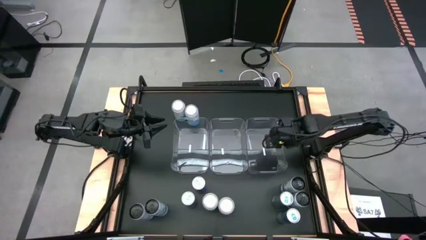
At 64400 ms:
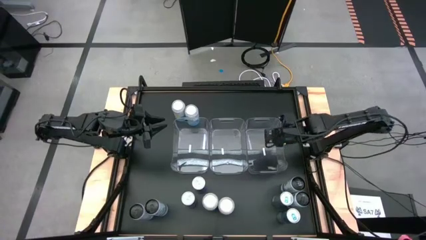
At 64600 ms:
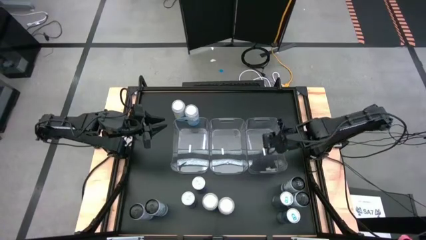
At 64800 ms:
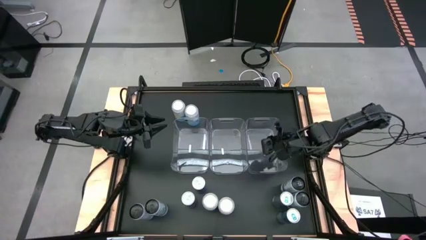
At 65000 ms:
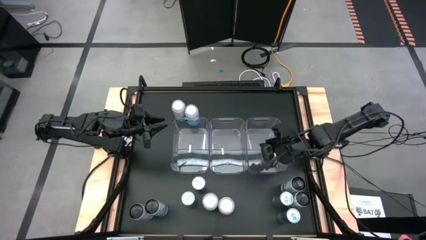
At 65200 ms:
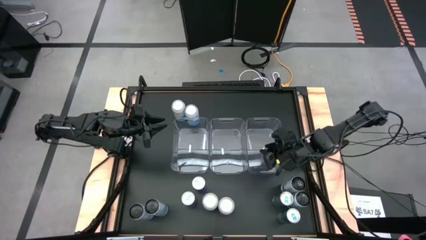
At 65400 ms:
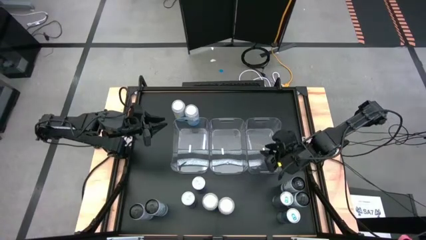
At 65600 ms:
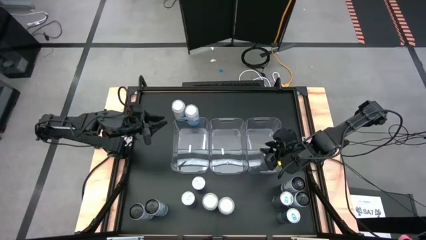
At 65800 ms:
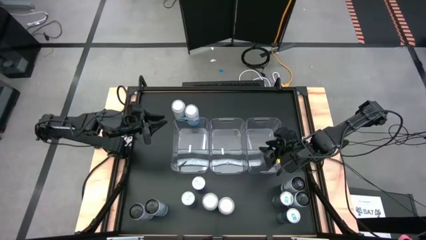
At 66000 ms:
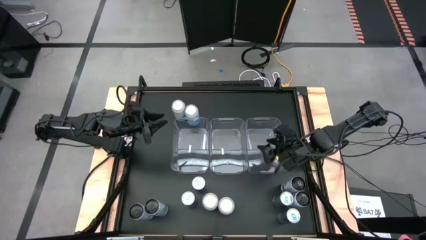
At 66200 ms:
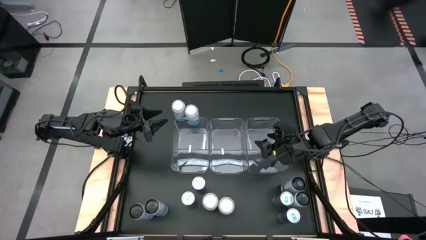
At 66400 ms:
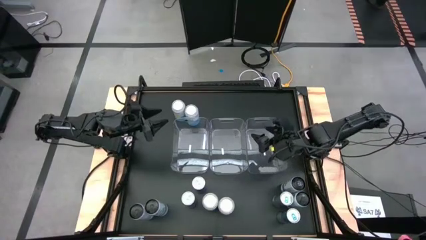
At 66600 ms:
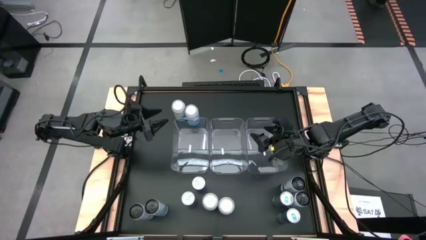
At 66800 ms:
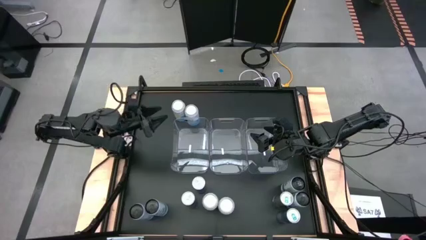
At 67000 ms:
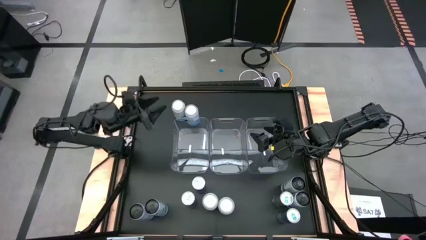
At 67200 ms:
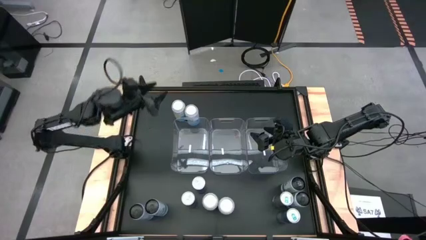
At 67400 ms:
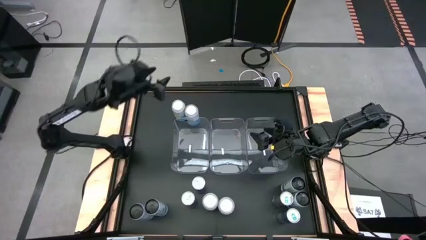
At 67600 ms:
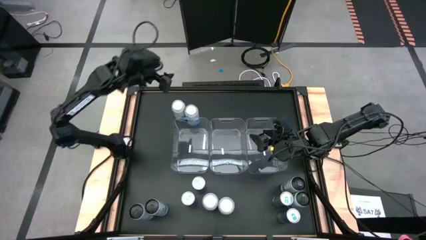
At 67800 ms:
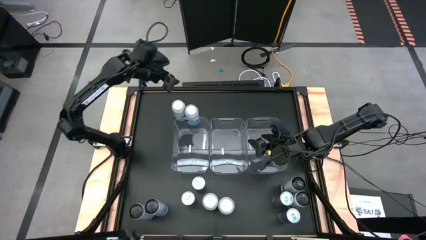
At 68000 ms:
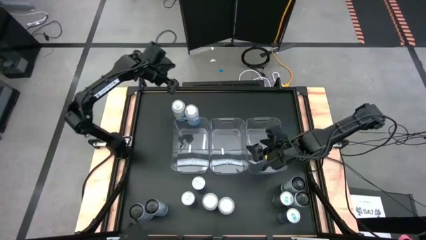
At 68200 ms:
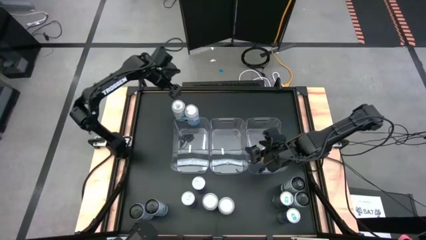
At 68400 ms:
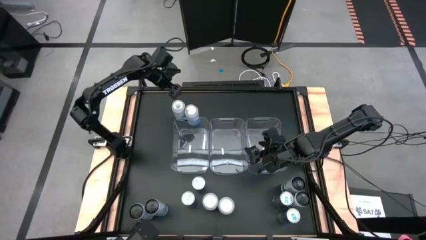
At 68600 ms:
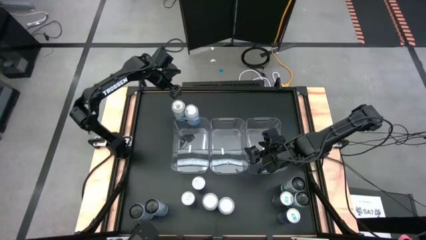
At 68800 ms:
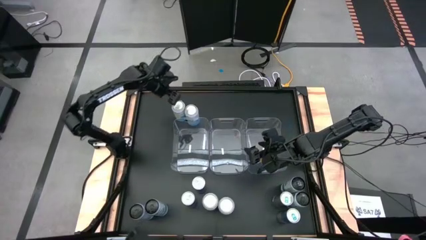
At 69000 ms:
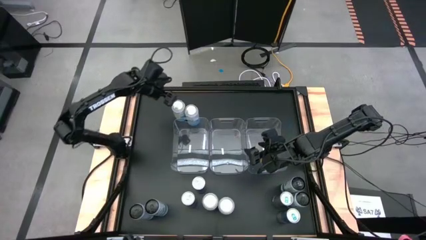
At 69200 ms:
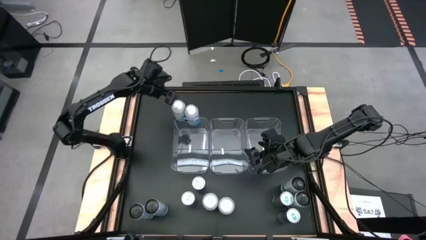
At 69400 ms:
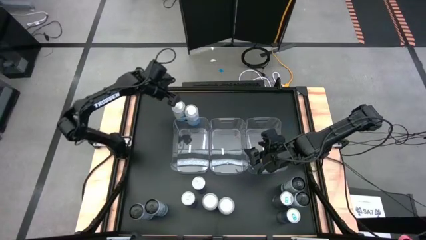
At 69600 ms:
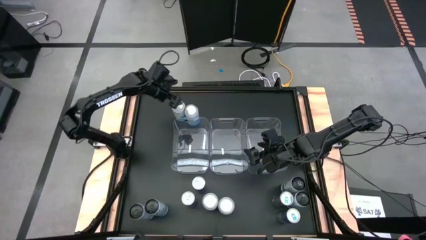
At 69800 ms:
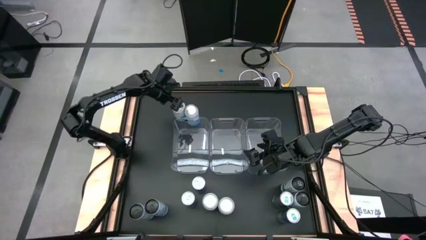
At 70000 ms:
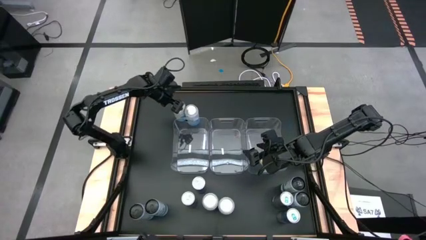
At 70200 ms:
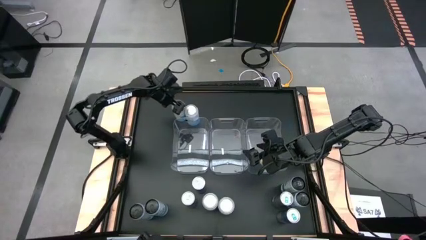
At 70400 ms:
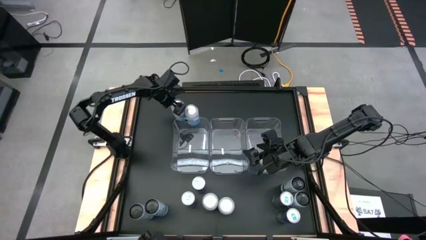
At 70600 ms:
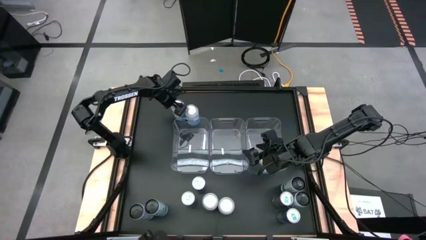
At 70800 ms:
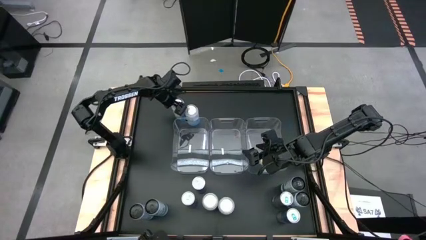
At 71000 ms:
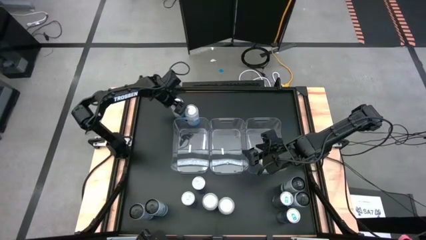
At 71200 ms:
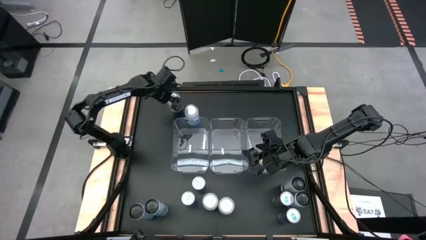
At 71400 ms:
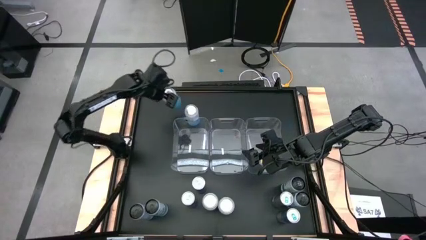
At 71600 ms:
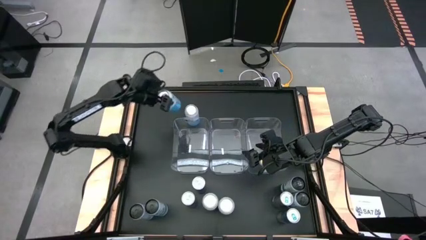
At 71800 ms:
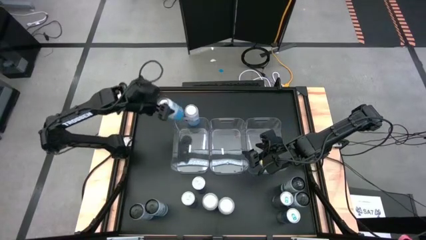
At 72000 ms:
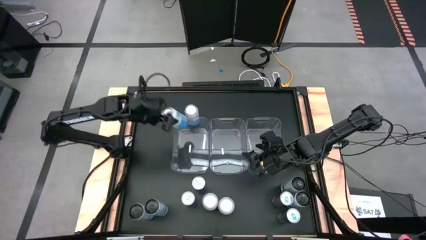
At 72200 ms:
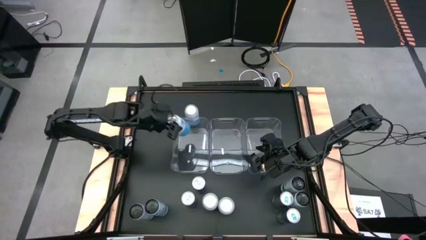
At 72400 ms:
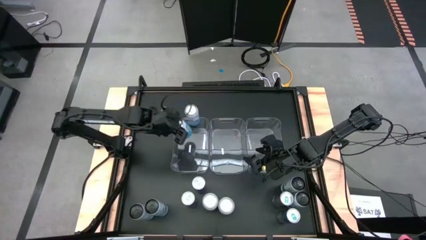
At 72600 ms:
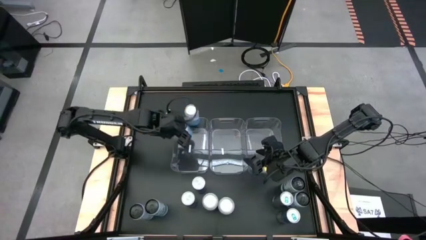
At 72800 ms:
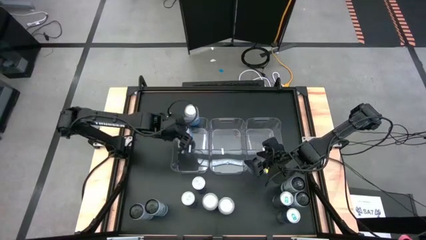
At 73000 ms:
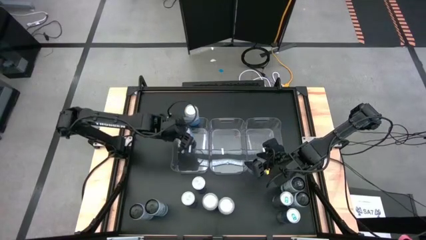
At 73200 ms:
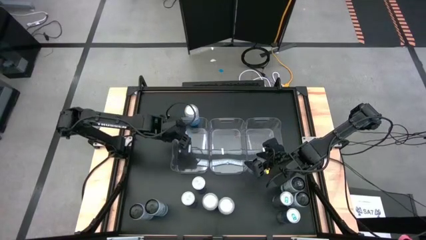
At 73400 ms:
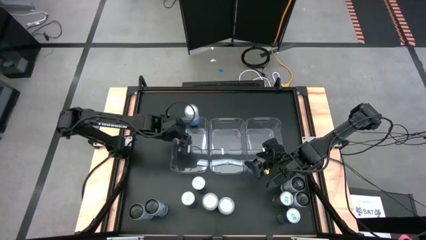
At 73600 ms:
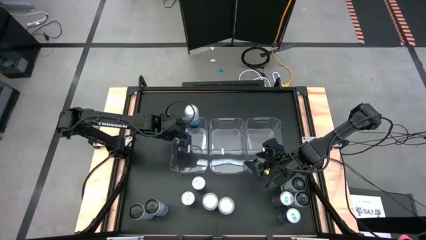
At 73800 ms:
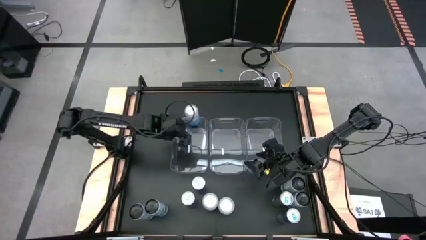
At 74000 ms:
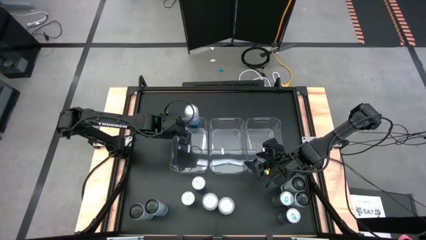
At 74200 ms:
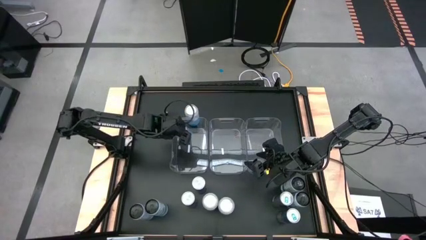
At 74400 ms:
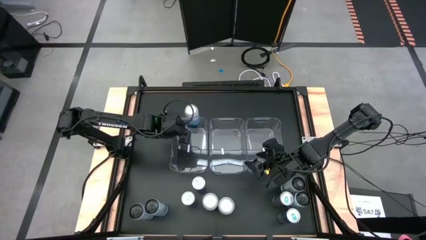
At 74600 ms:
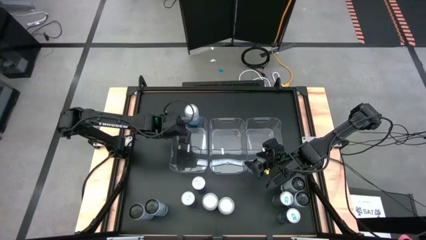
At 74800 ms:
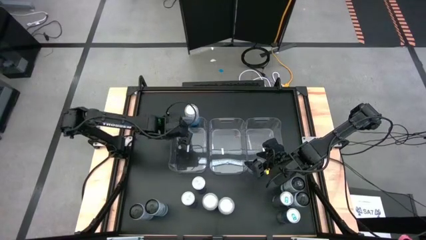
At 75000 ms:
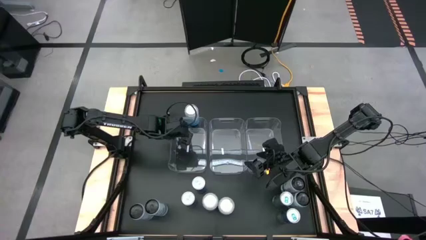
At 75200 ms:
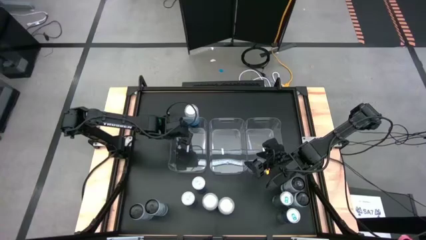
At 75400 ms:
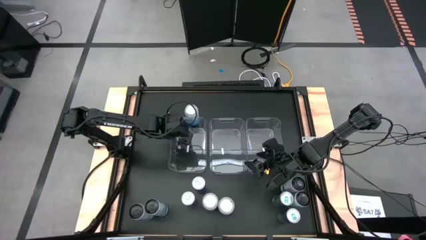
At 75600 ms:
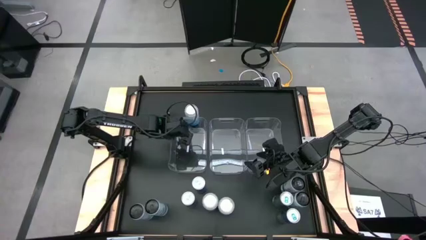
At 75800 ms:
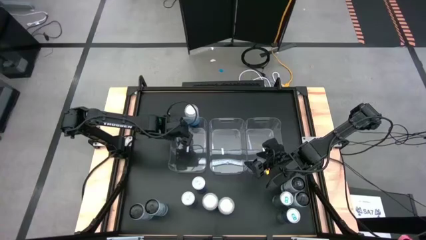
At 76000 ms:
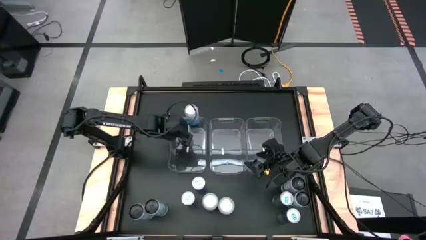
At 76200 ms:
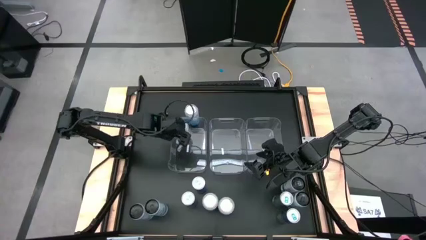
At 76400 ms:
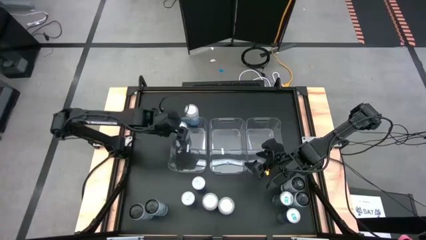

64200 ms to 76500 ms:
Task: Sort soda cans
Put the top left blue-white soda can into the left transparent bin

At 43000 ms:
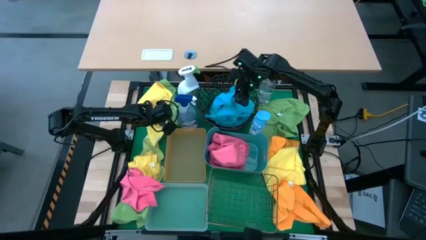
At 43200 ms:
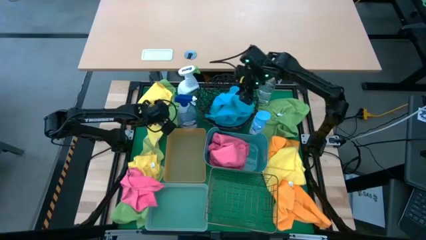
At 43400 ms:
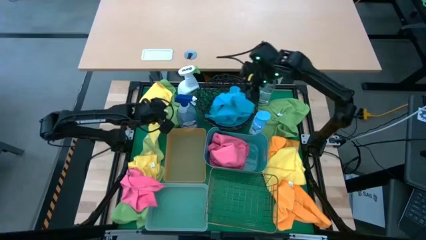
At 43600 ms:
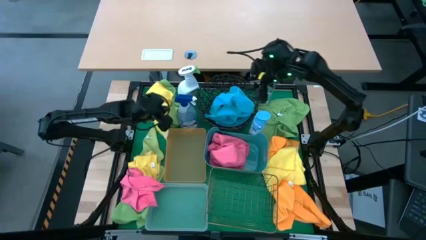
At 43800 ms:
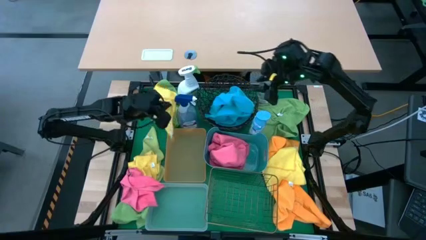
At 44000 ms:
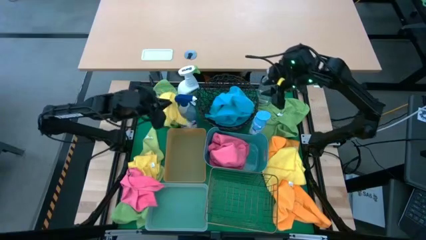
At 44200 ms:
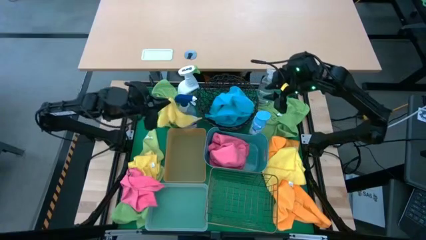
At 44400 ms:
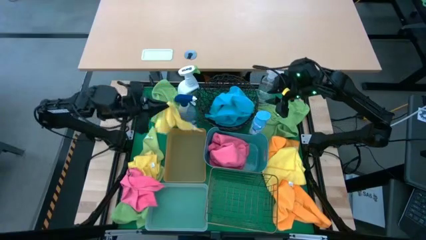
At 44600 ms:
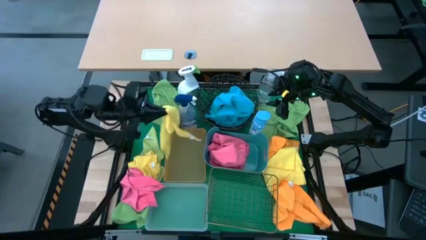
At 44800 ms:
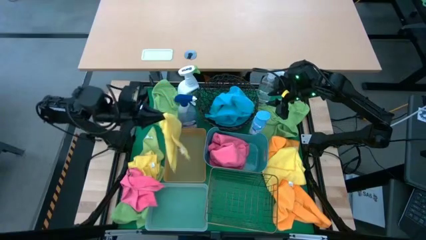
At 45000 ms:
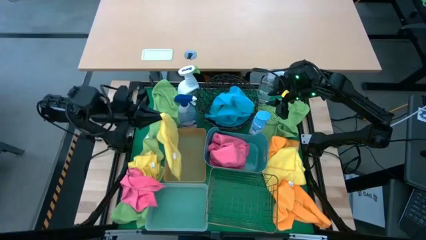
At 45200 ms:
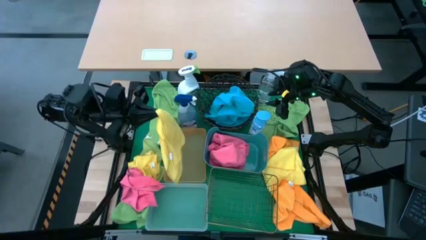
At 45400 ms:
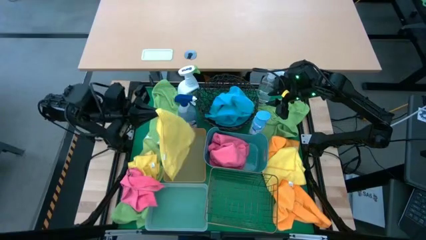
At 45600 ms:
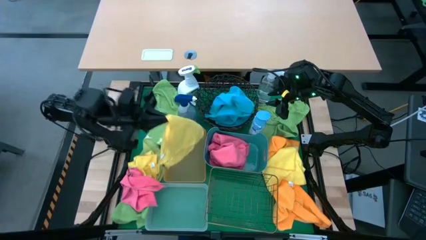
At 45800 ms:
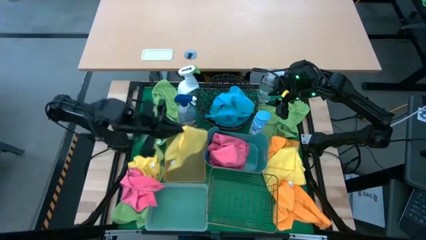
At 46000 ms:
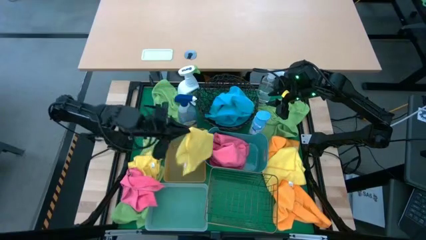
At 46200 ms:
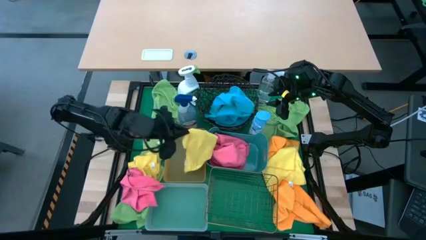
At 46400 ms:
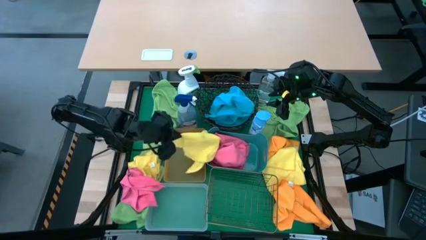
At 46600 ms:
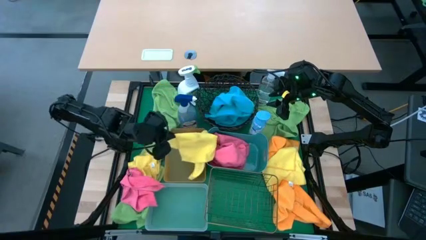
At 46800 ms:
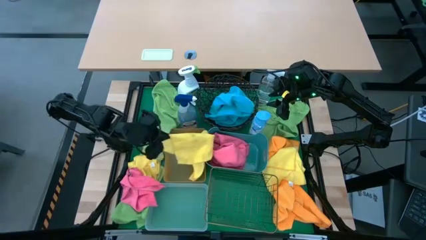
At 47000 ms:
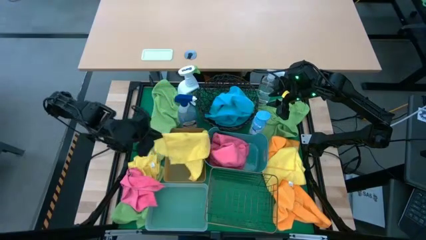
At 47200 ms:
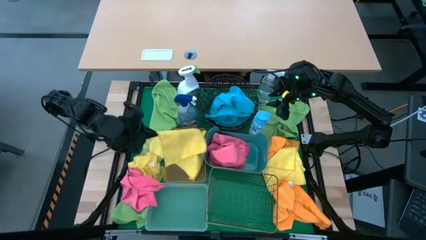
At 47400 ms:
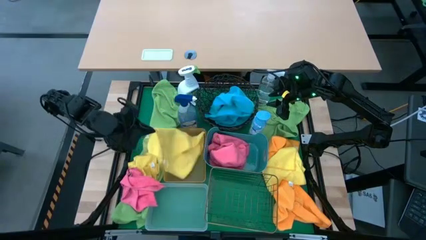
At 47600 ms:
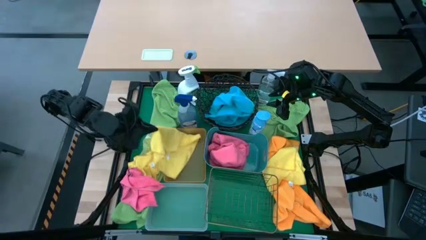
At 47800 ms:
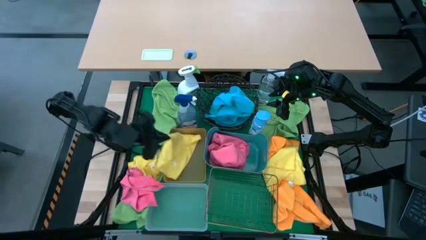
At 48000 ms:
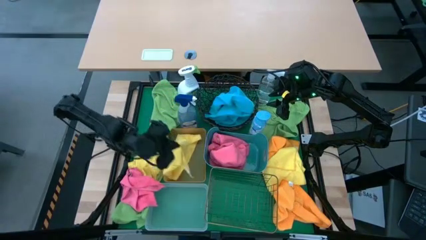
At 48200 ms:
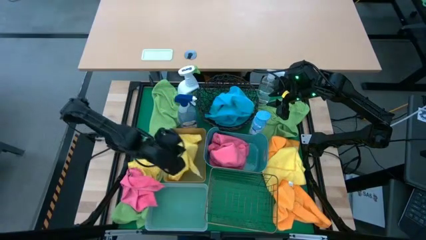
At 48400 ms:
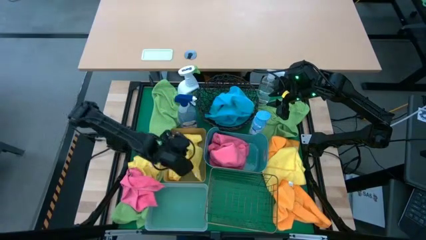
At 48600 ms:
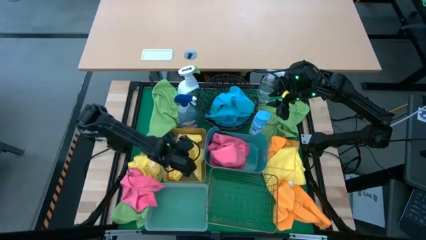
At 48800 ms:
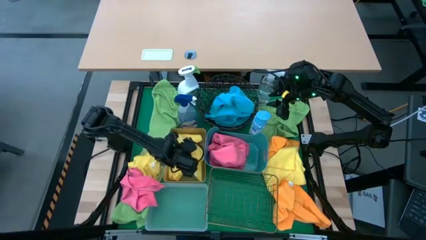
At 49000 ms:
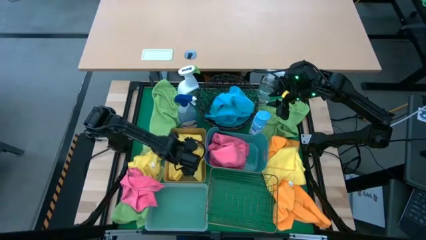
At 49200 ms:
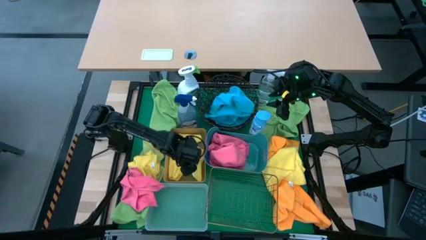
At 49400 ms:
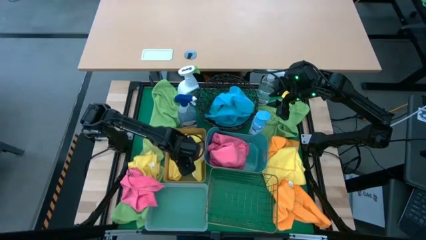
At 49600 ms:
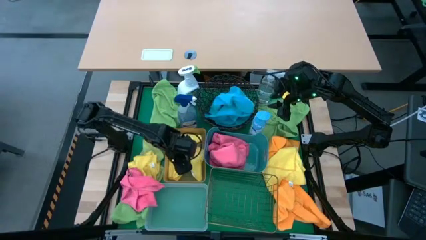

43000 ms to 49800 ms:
Task: Sort microfiber towel by color & place in baskets
Put the top yellow towel into the orange bin
